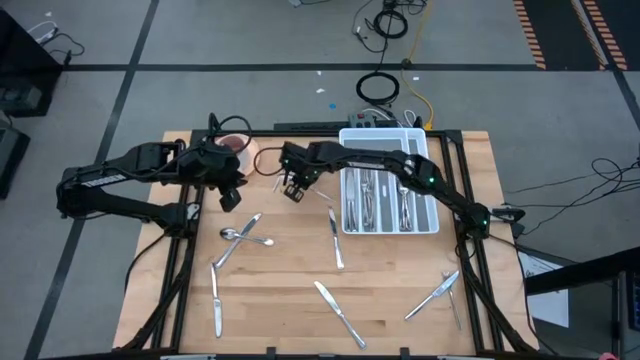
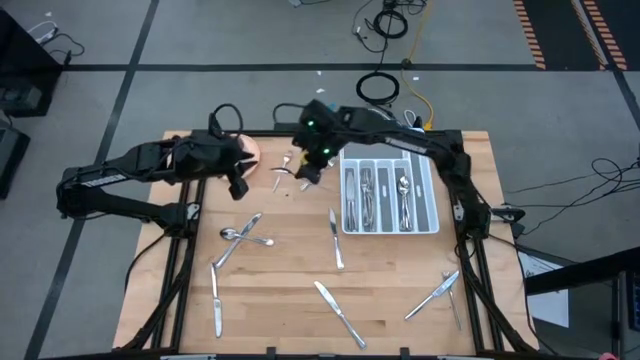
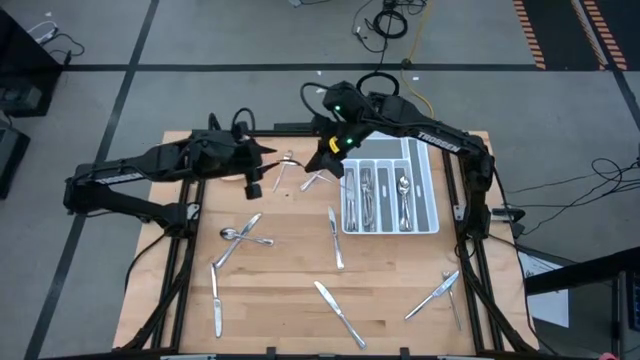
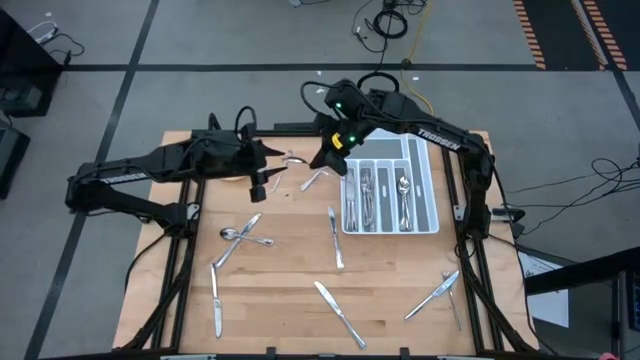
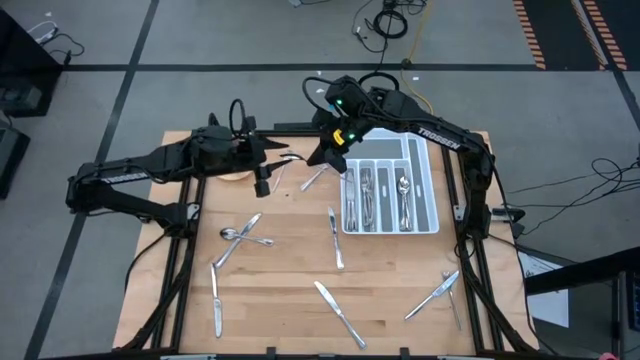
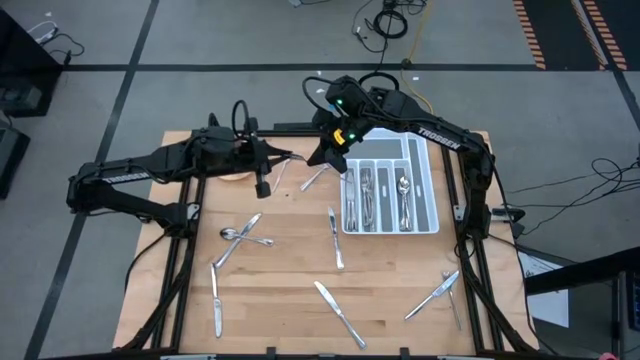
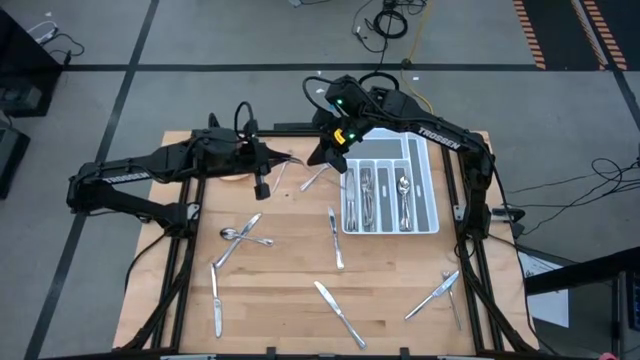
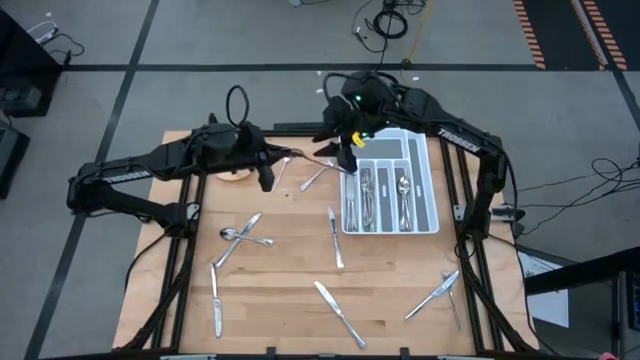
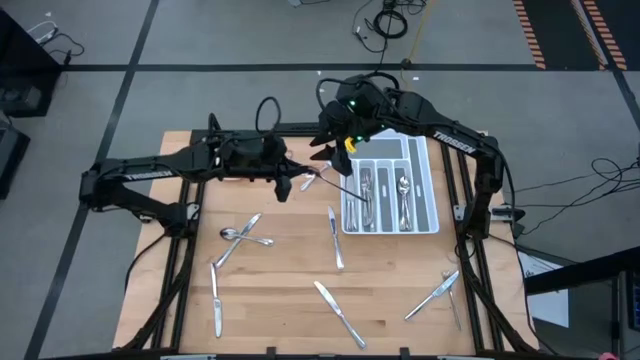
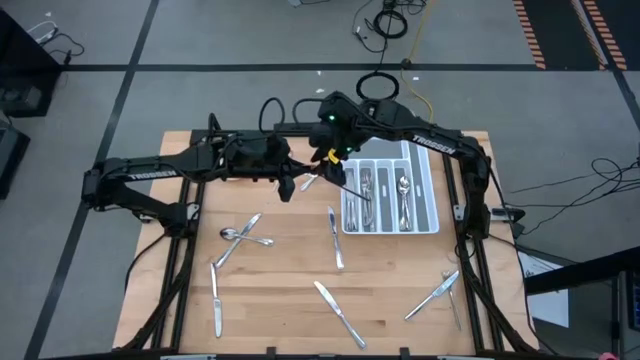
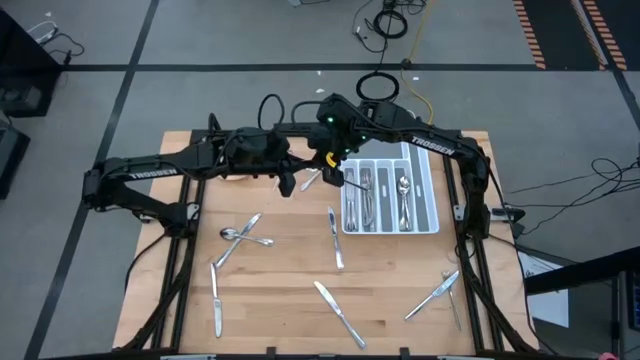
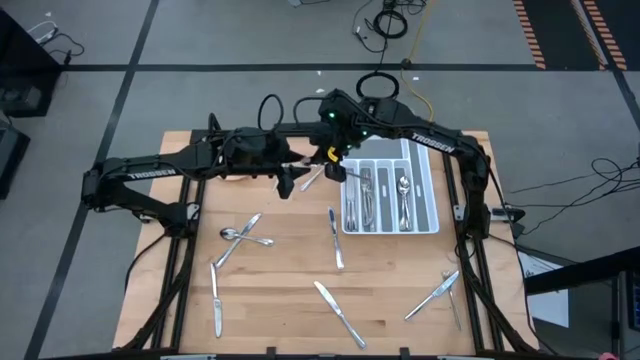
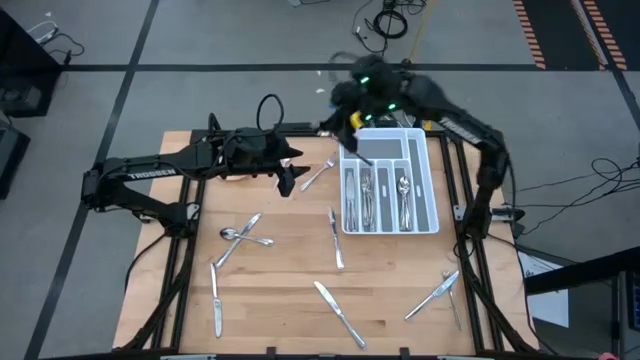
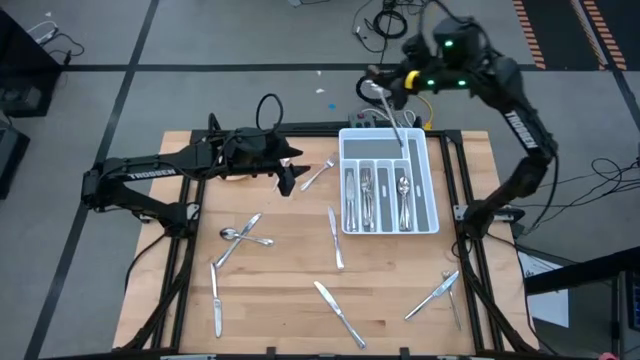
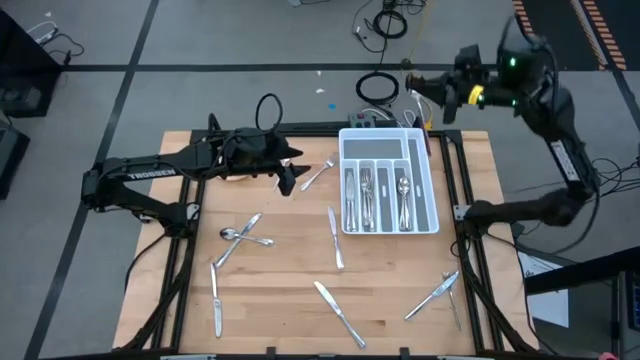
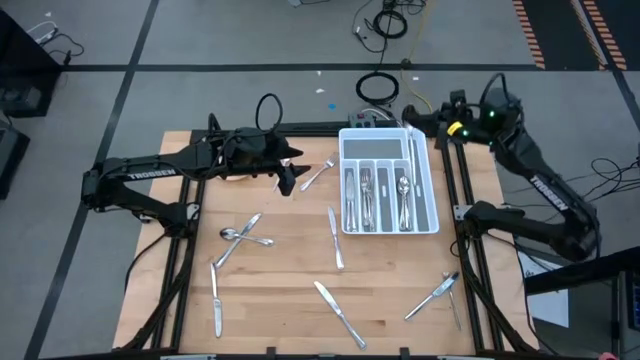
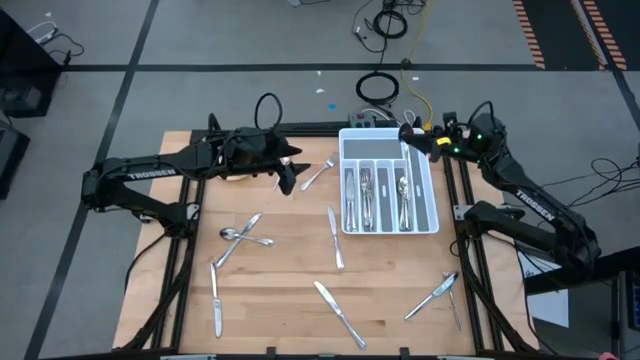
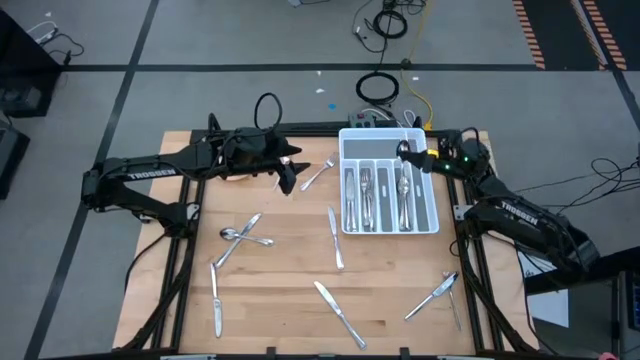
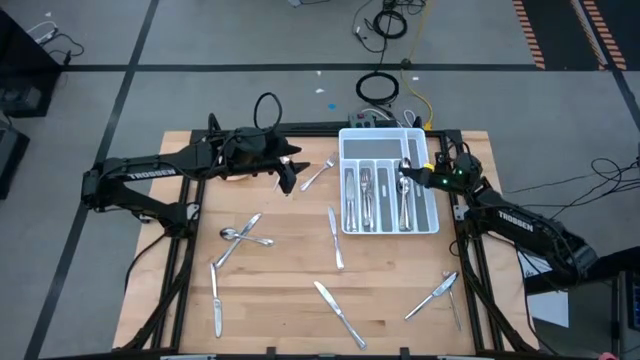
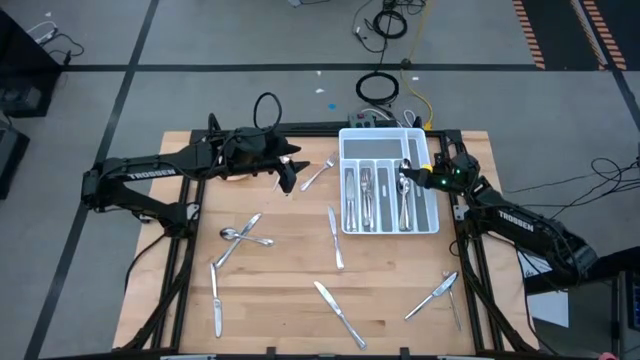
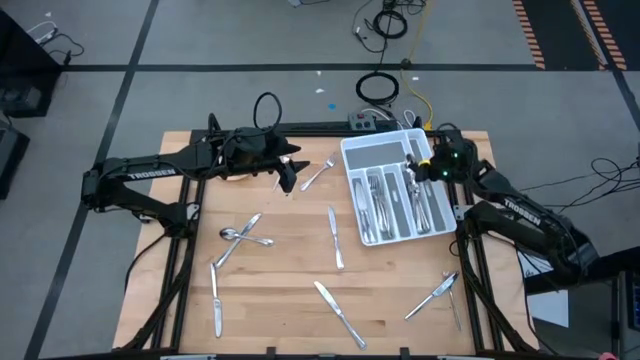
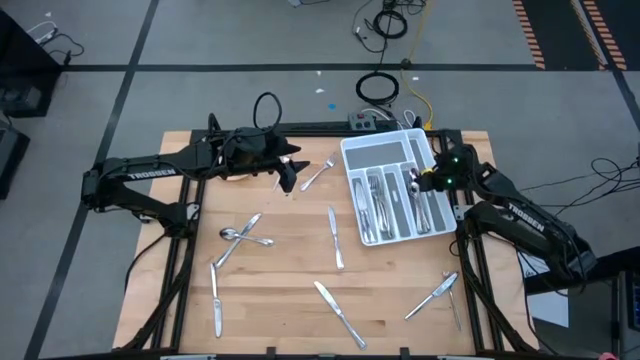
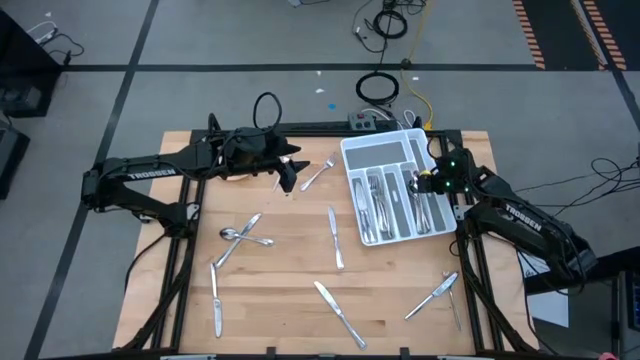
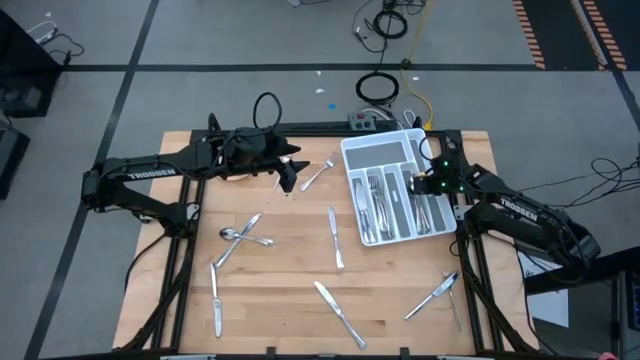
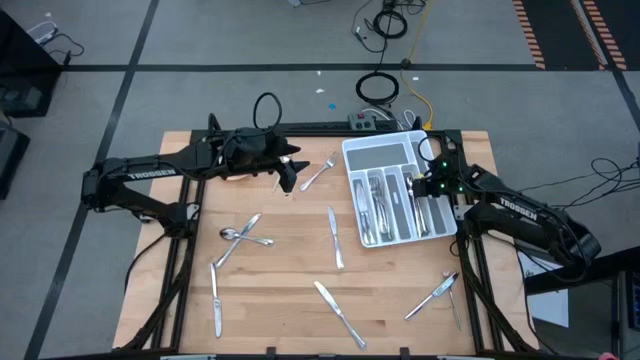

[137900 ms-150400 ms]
Task: Sort silverware
Put the silver spoon into the white silverware tray

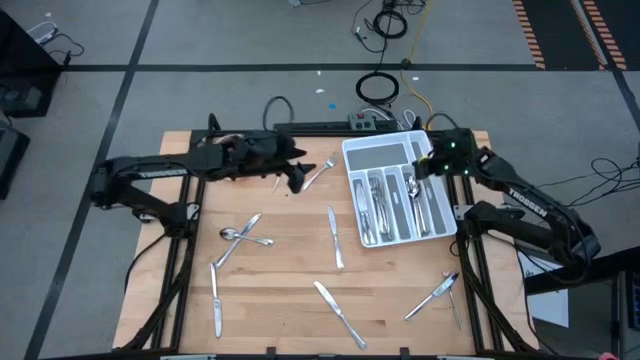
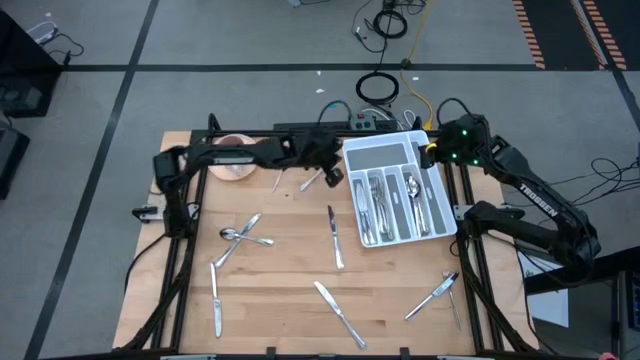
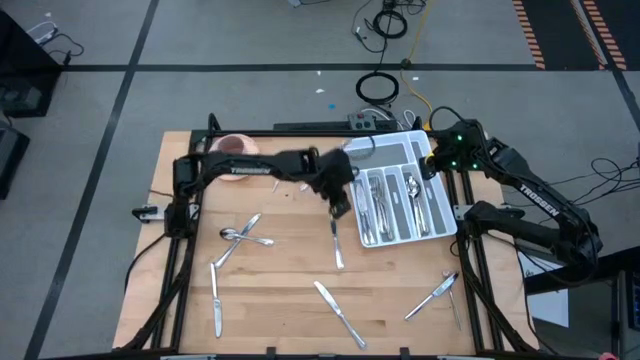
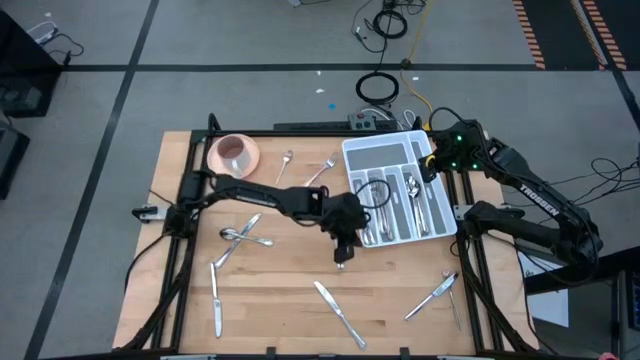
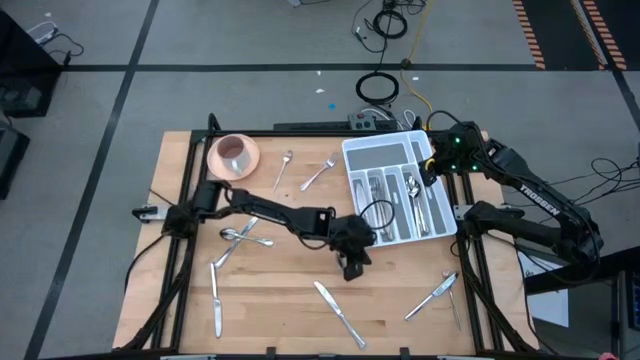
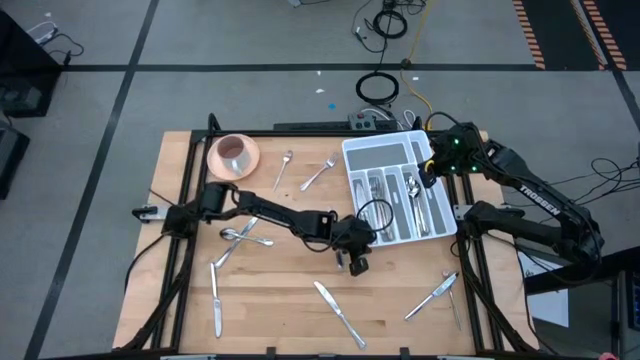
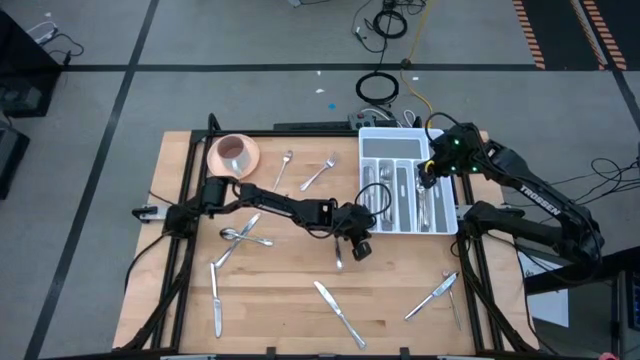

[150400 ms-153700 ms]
Adjust the white silverware tray on the table

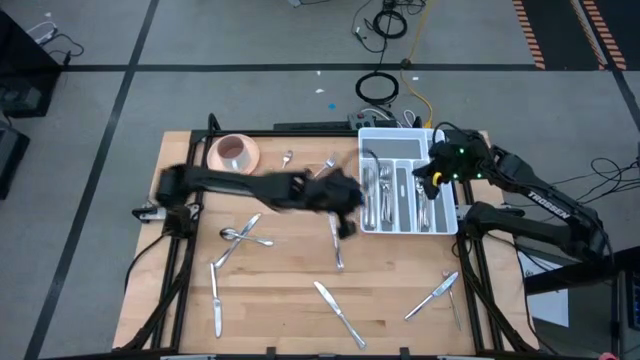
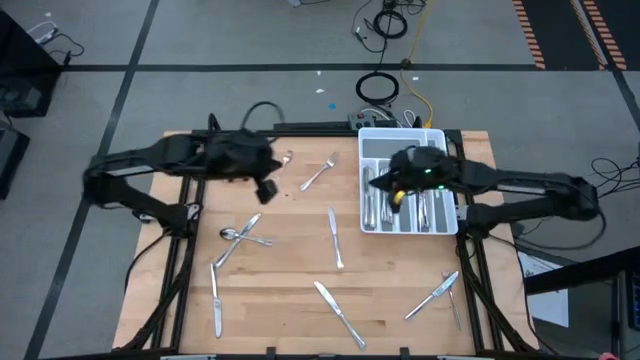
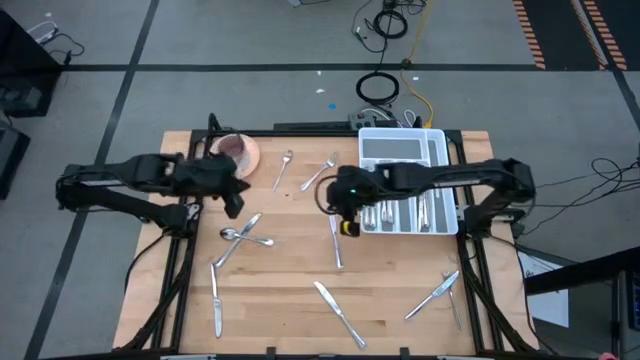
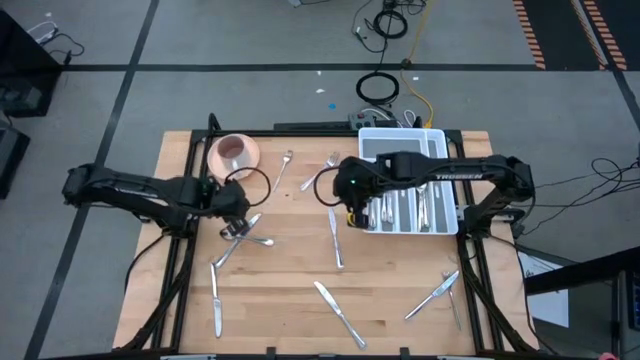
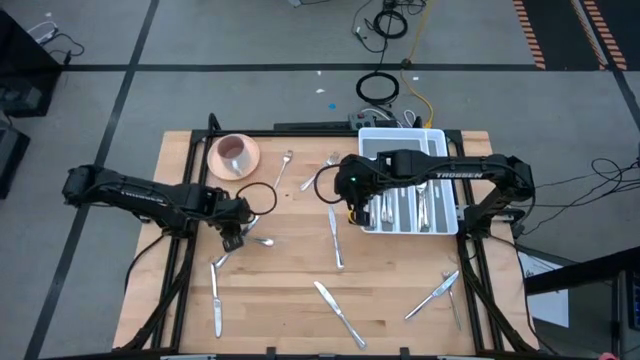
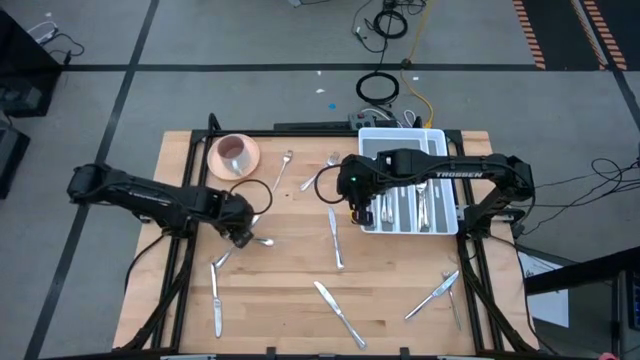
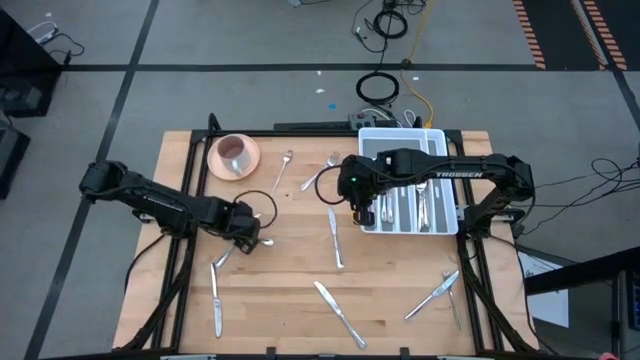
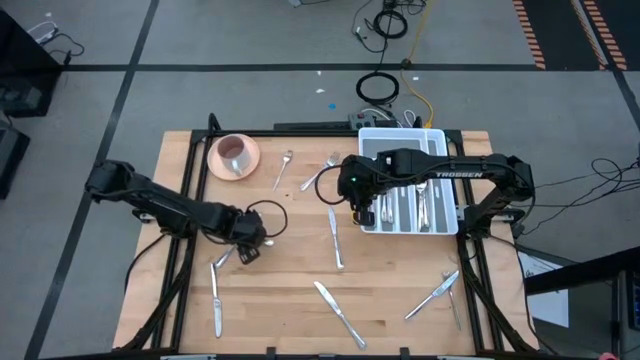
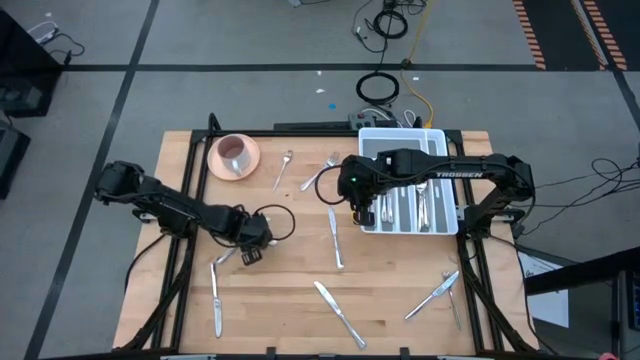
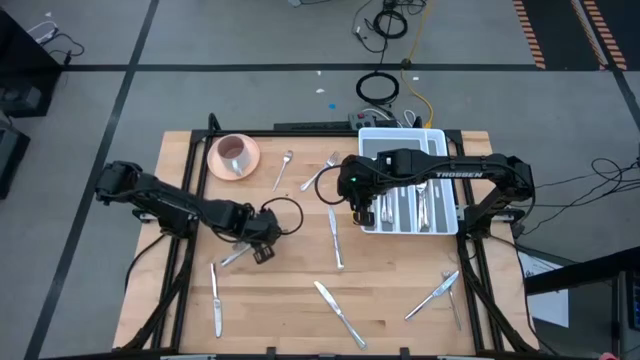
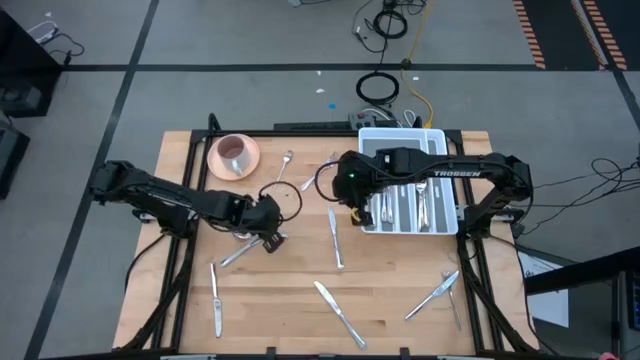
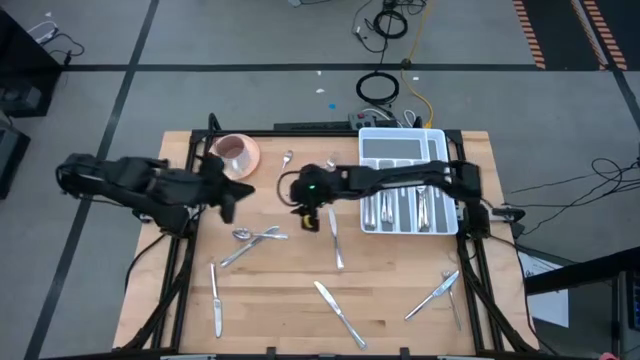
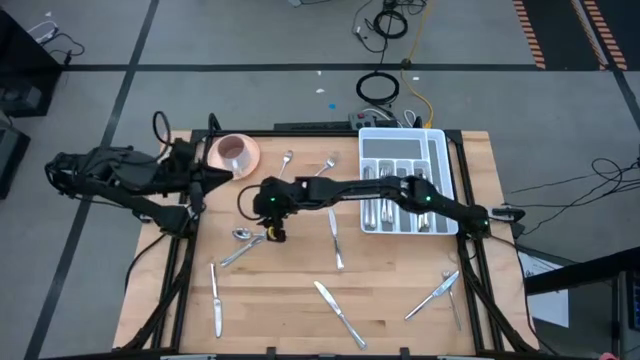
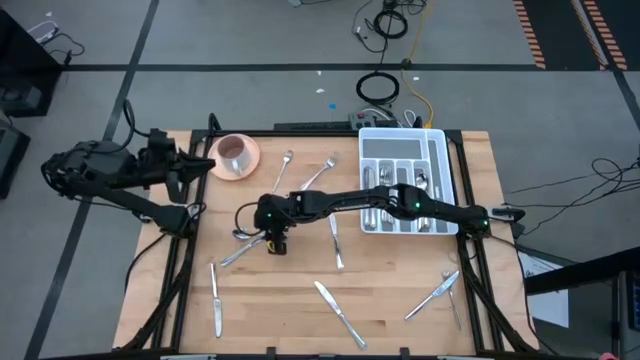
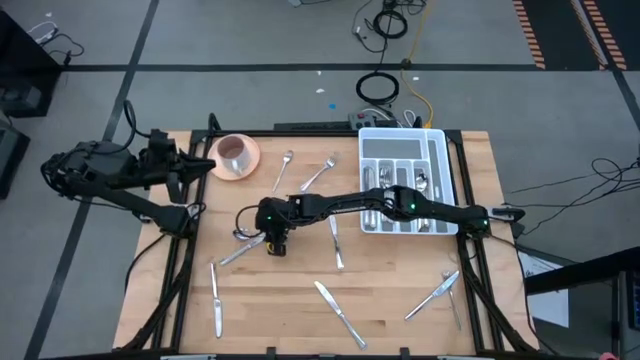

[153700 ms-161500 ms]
Put the silver spoon into the white silverware tray
